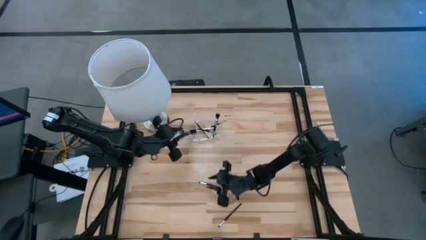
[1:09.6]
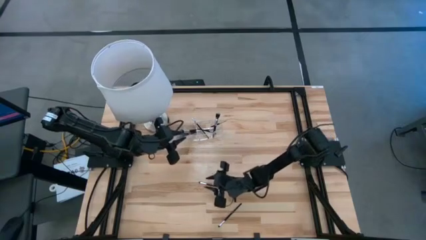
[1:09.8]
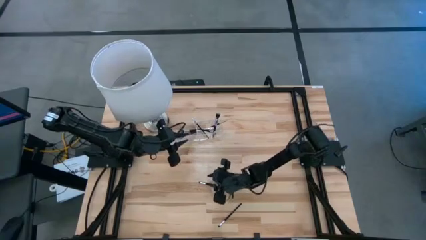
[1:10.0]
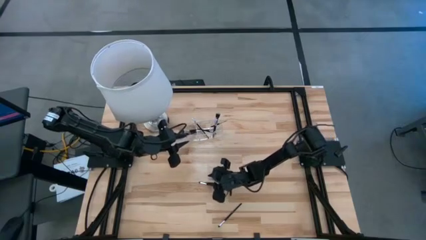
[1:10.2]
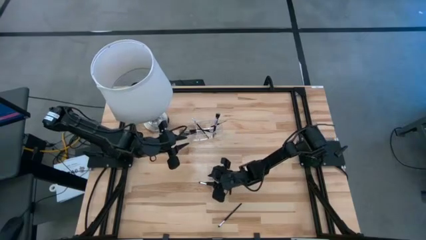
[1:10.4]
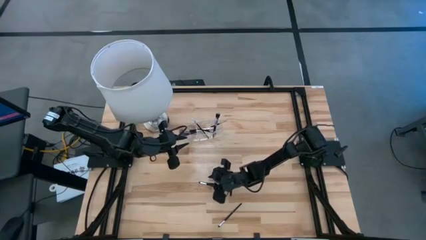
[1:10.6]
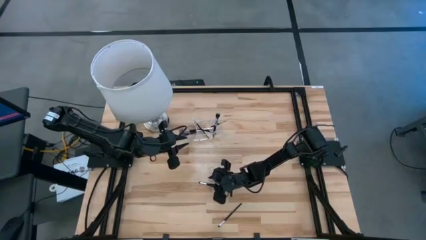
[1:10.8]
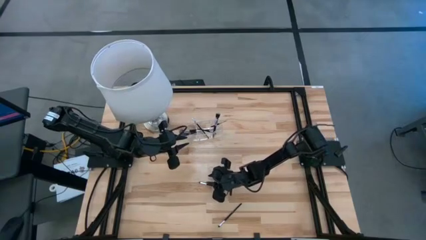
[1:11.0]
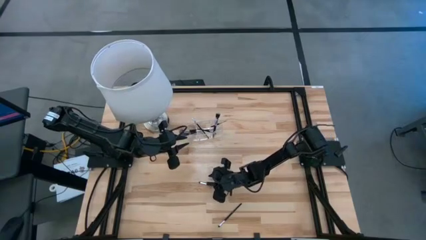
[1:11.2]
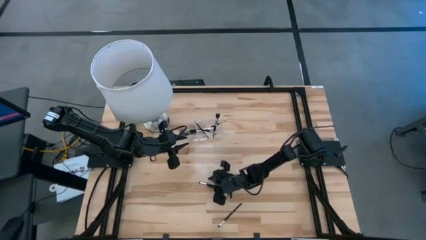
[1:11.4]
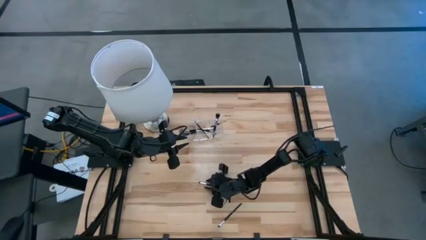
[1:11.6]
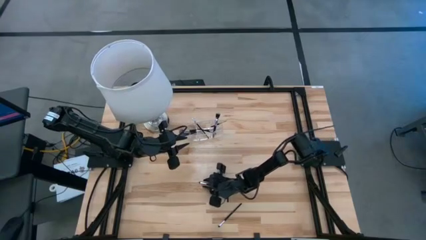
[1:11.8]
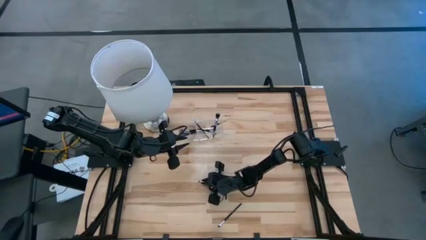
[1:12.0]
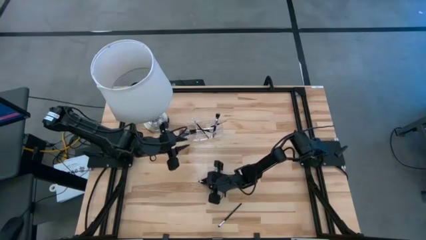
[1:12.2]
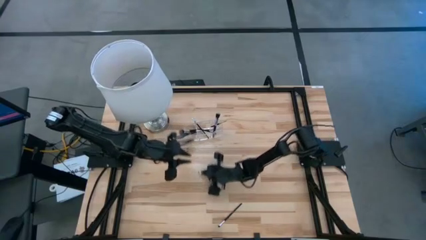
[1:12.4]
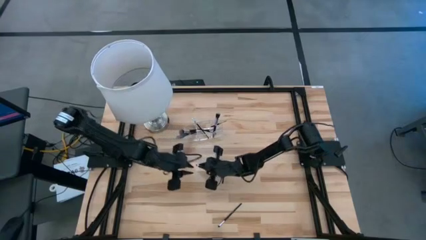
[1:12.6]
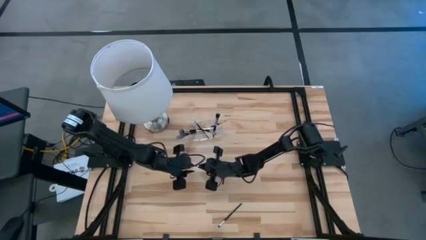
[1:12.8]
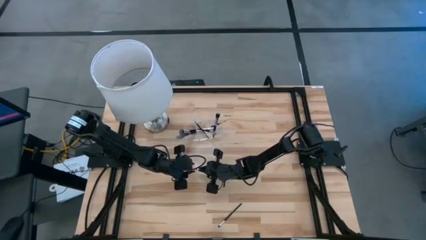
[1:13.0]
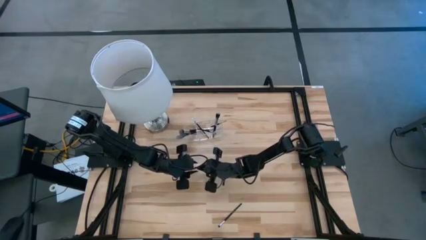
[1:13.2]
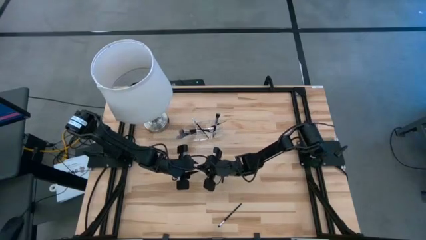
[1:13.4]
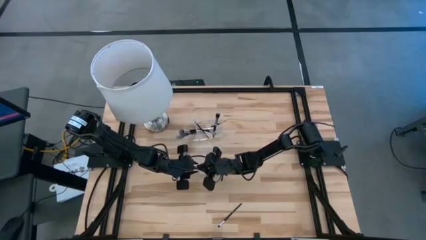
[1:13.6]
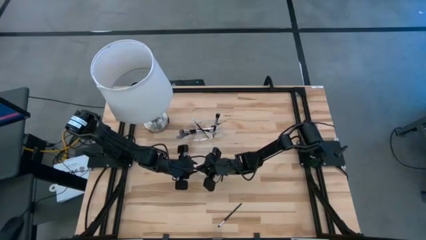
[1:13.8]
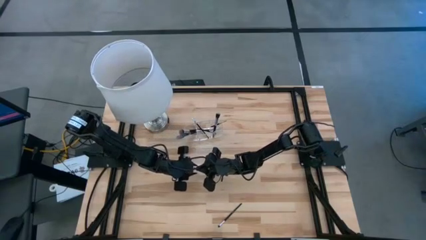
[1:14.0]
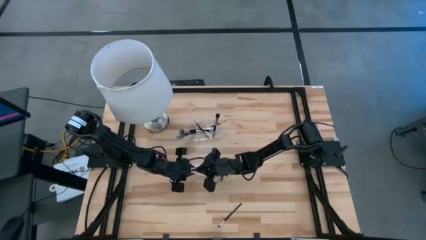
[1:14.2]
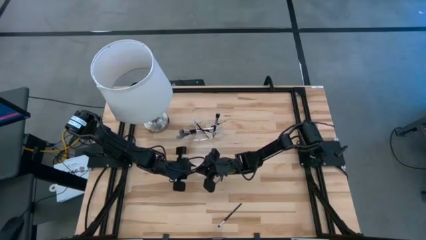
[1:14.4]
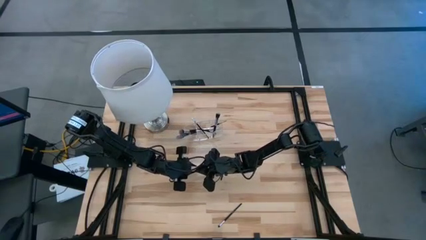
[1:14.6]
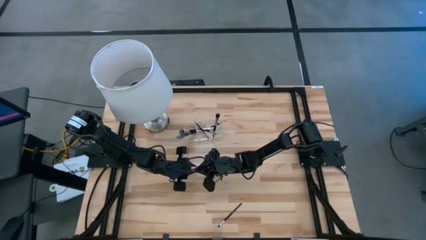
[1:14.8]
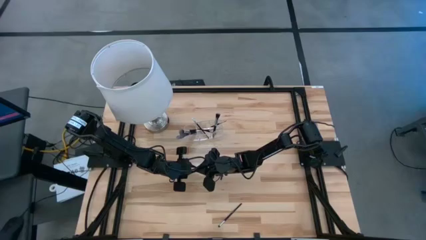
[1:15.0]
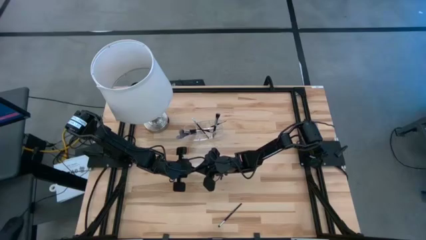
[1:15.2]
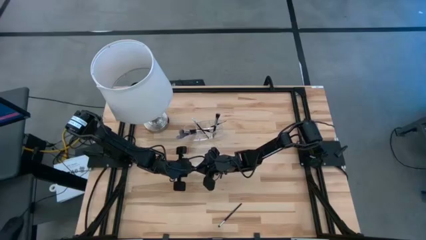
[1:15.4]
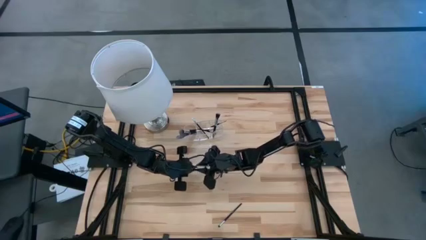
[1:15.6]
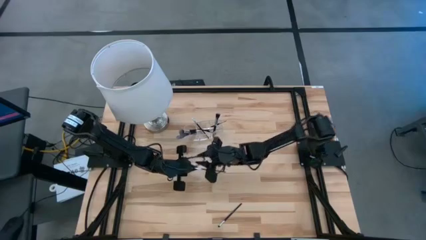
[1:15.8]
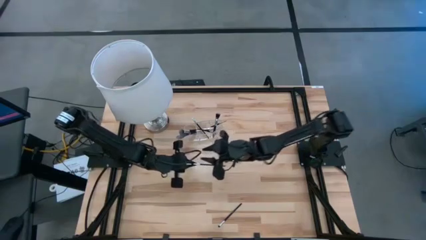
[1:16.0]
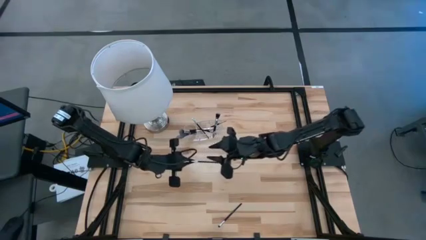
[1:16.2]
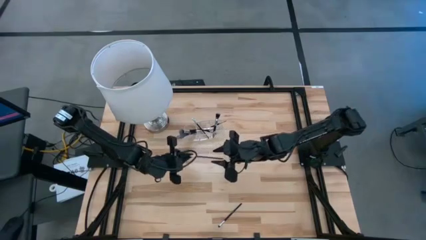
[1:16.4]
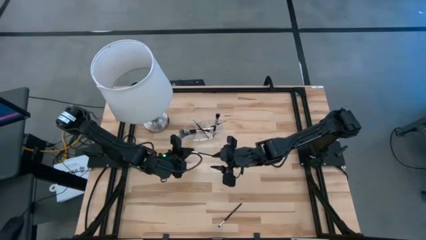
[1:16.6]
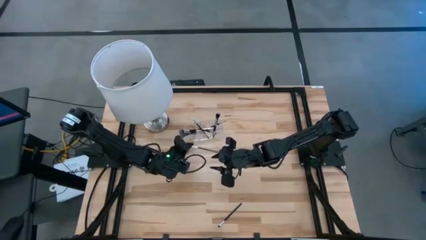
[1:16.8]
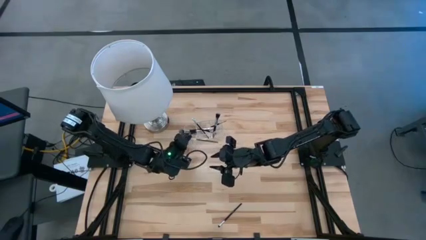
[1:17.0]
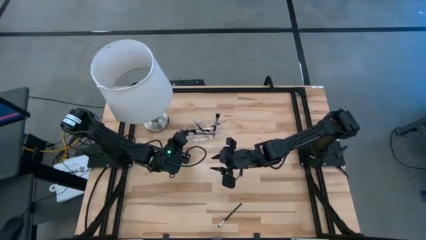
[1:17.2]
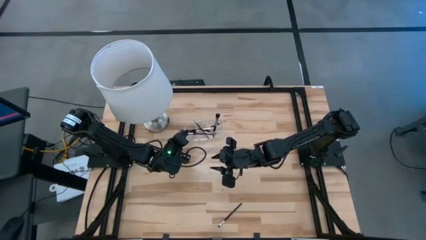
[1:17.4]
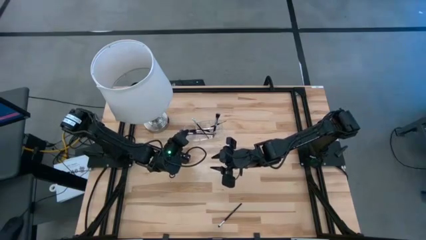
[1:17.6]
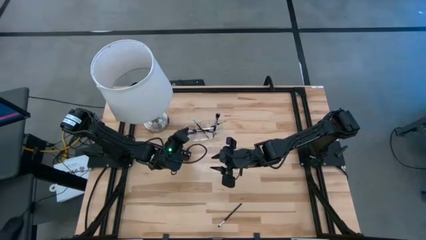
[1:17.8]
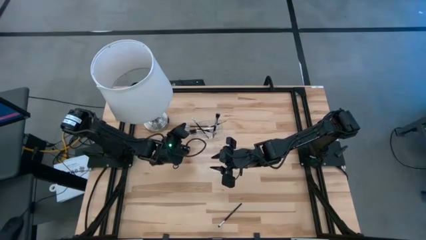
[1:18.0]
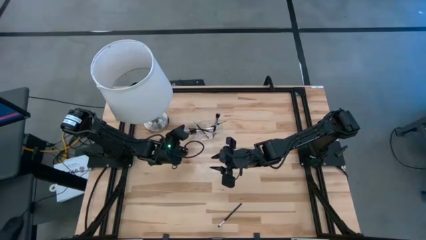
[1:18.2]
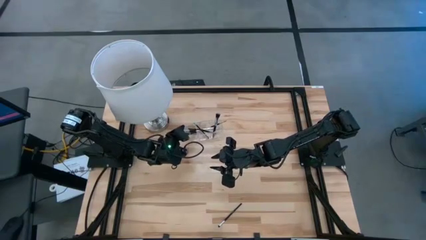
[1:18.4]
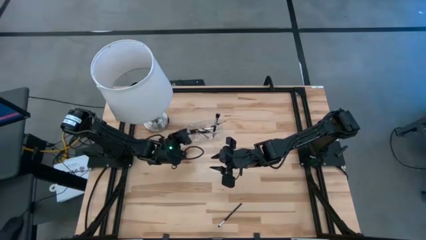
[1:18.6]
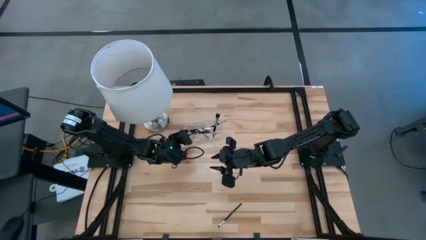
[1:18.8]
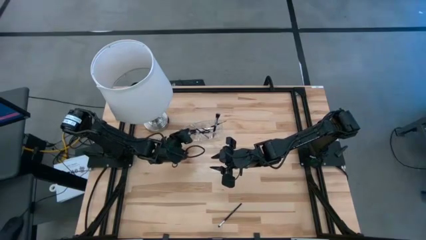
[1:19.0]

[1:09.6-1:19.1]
Task: Put items in baskets/containers
Put the top black eyeshadow brush into the transparent organizer

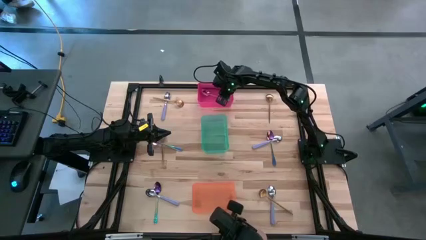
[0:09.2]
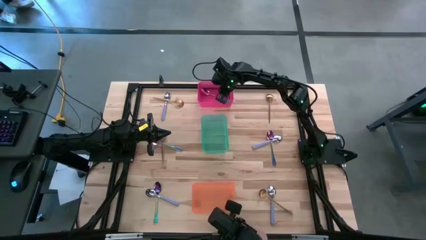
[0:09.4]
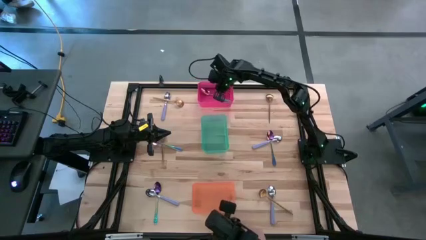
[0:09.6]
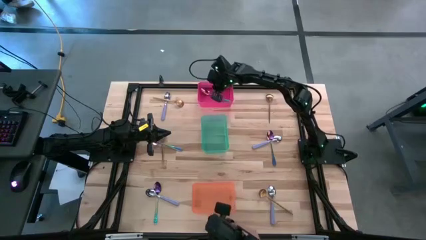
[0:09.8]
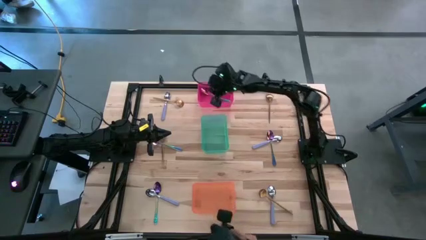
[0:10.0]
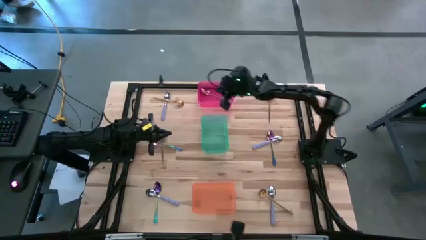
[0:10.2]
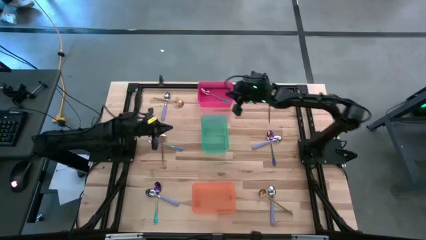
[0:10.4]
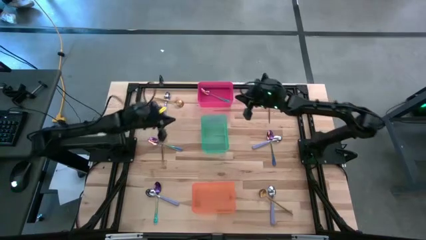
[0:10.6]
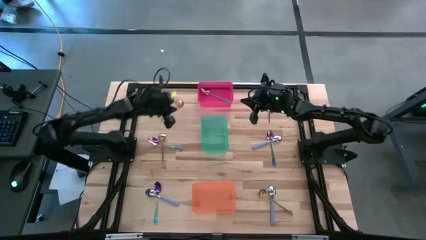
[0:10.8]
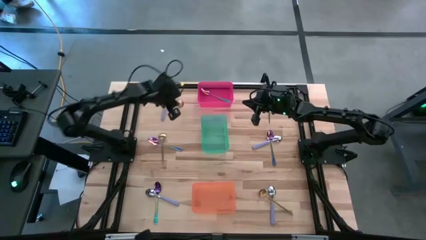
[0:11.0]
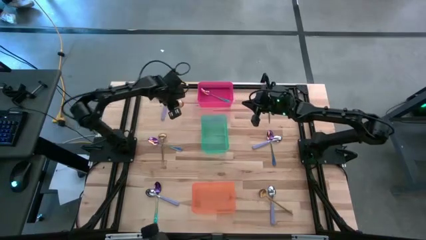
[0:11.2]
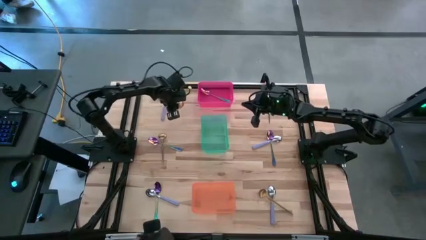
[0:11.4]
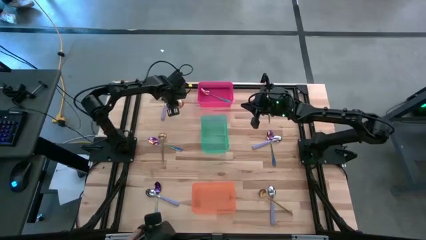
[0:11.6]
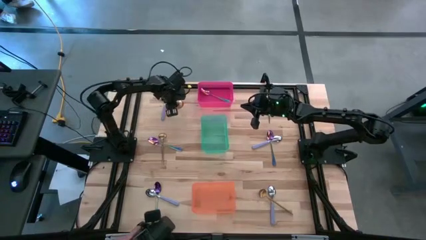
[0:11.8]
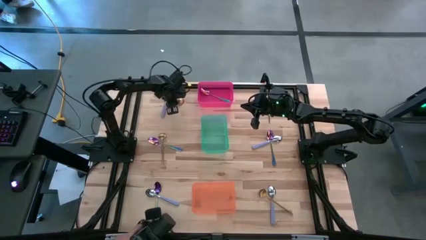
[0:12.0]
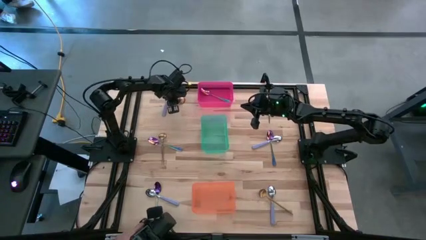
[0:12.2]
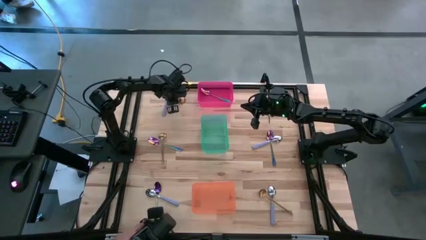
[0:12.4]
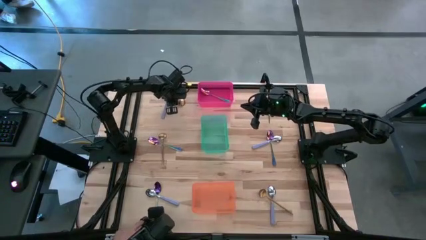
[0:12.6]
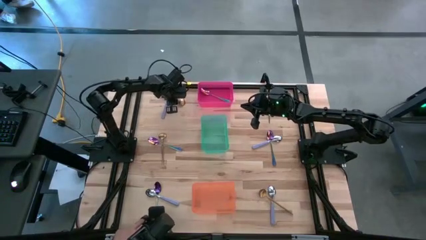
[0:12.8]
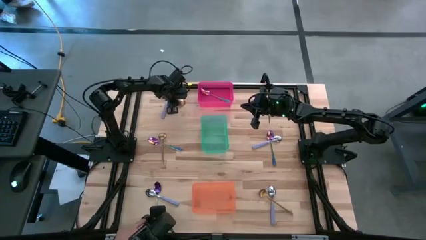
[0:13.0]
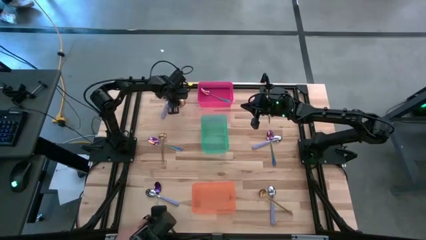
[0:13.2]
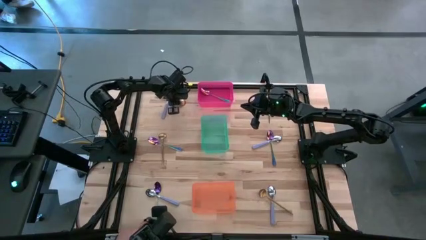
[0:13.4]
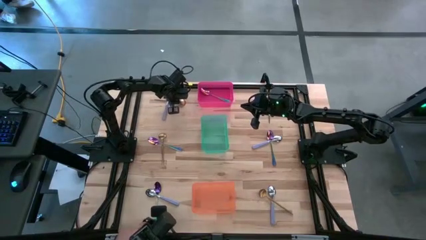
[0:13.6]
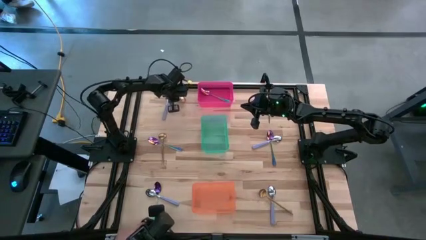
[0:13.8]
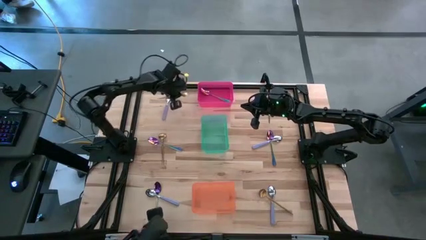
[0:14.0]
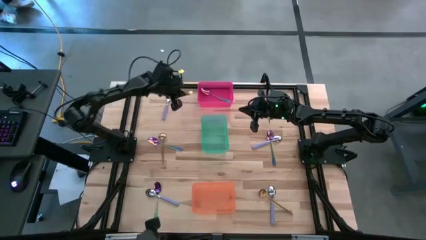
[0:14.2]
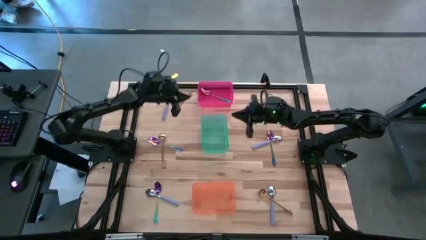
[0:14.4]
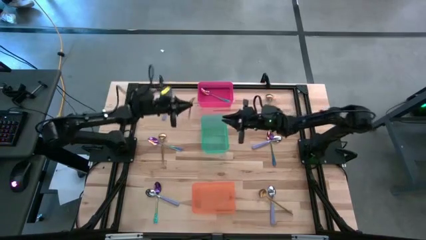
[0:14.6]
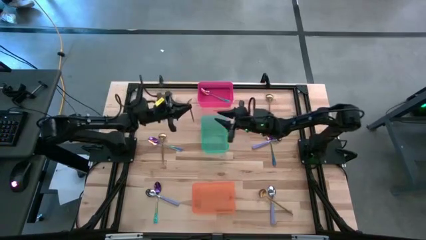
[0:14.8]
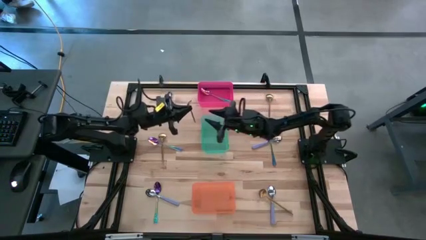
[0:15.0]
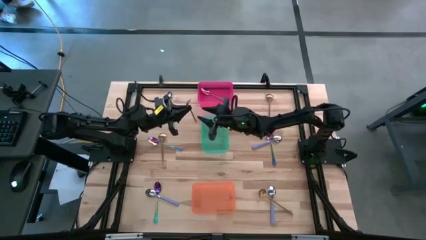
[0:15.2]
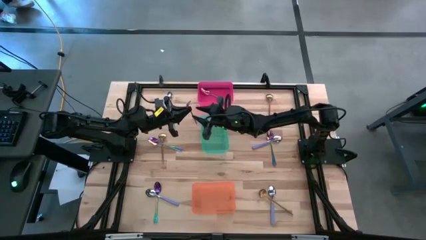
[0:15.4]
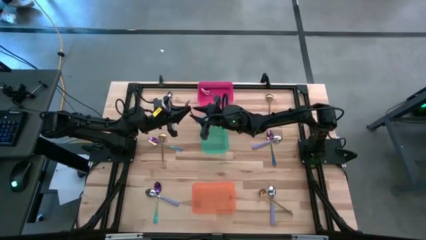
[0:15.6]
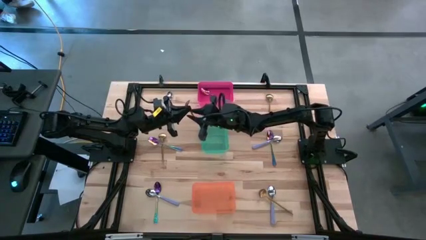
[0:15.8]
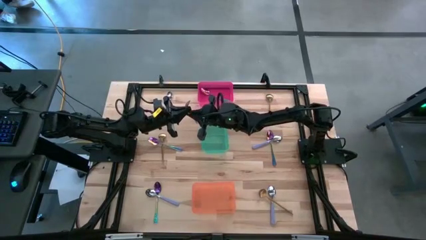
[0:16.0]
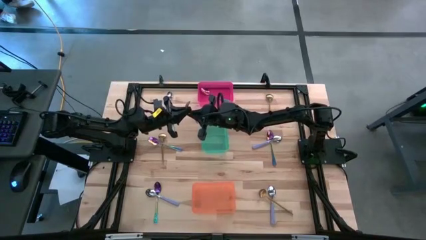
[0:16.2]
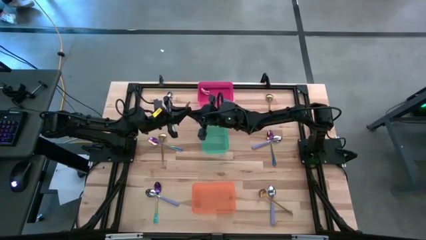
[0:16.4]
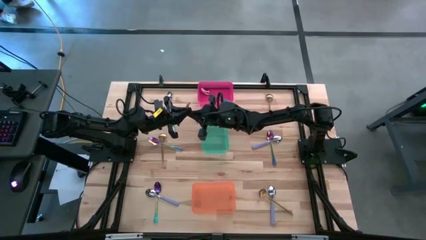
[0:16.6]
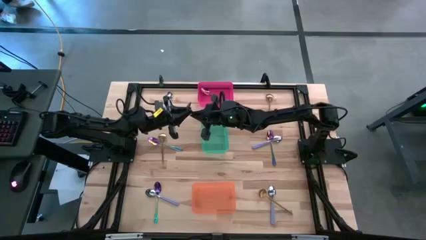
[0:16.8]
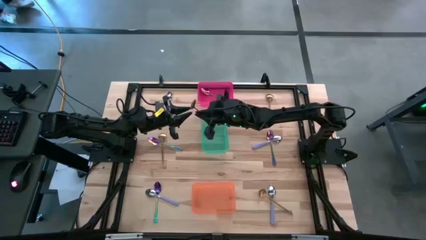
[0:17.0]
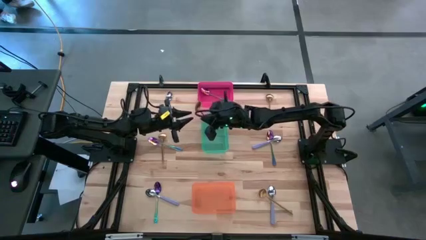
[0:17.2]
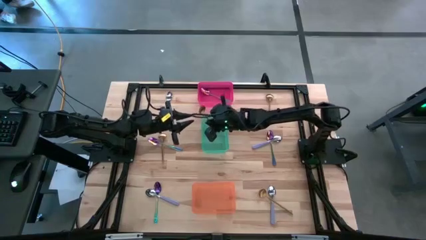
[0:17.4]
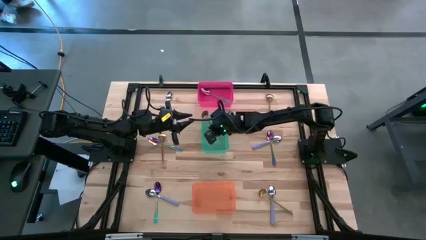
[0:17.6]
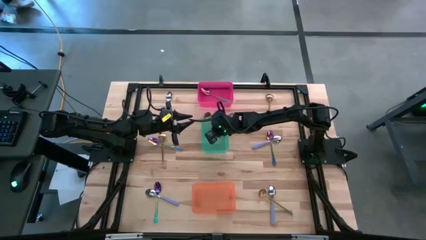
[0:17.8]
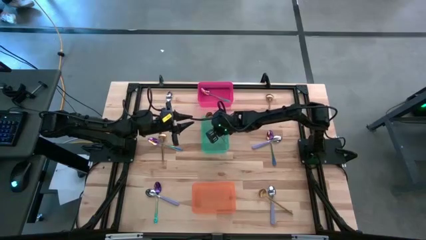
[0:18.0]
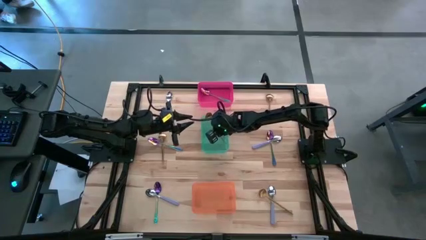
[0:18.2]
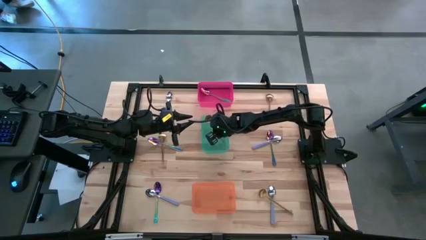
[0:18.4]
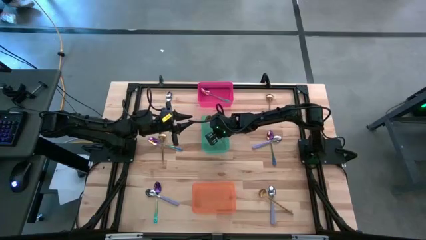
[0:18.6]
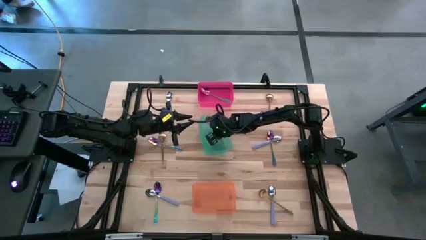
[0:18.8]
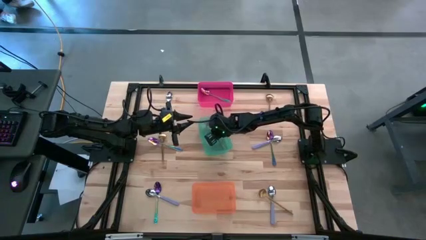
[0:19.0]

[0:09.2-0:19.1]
Task: Sort silverware by color (type)
Put the gold spoon into the blue bin
